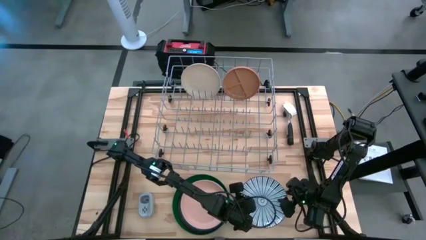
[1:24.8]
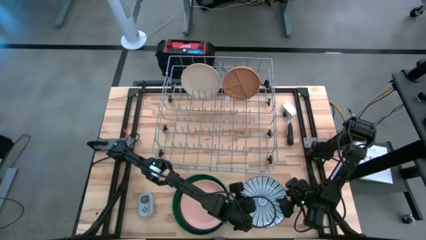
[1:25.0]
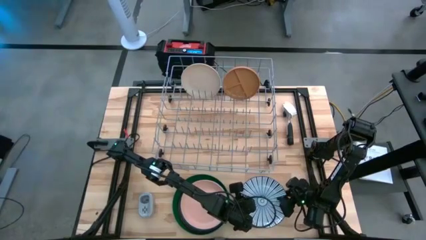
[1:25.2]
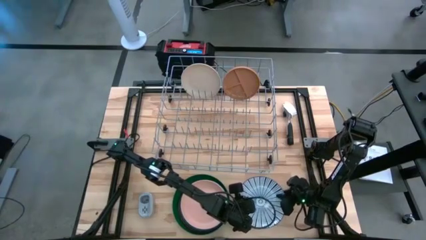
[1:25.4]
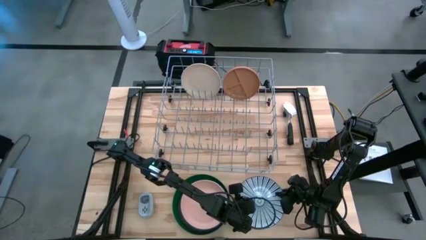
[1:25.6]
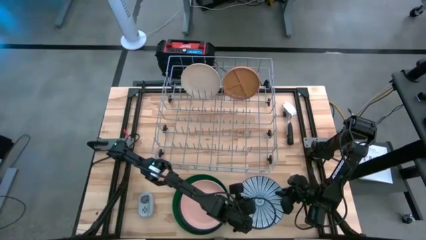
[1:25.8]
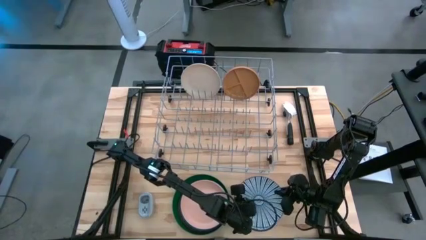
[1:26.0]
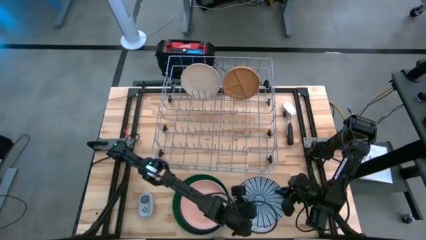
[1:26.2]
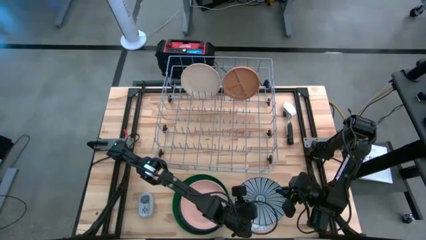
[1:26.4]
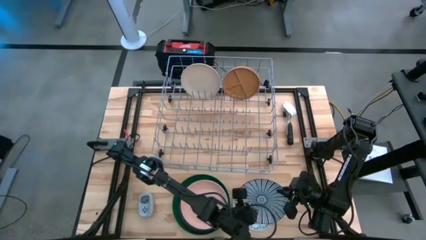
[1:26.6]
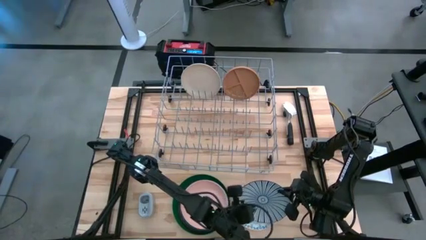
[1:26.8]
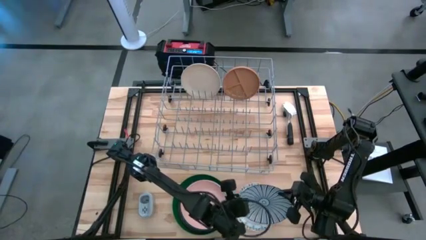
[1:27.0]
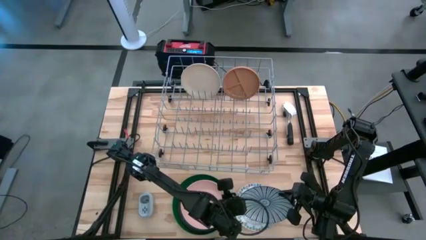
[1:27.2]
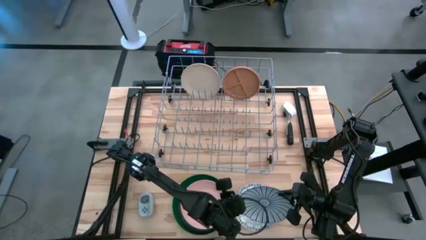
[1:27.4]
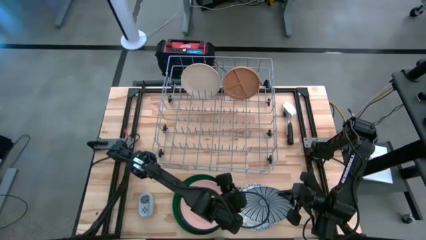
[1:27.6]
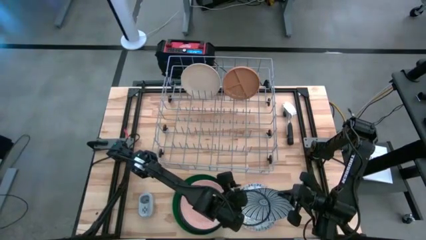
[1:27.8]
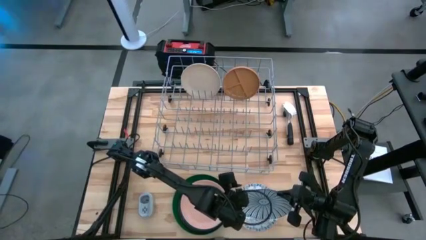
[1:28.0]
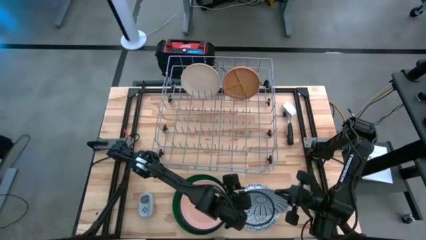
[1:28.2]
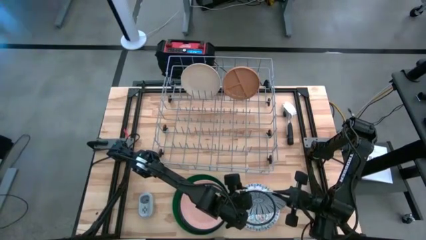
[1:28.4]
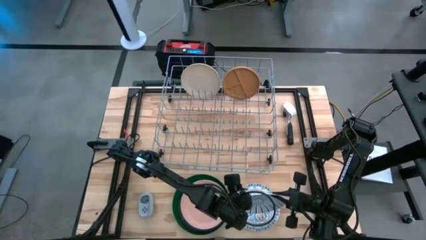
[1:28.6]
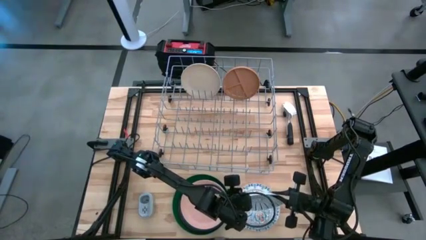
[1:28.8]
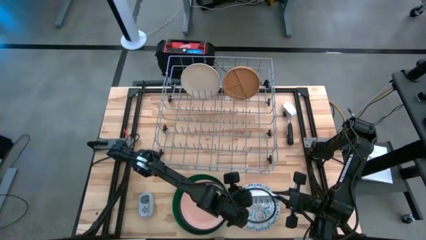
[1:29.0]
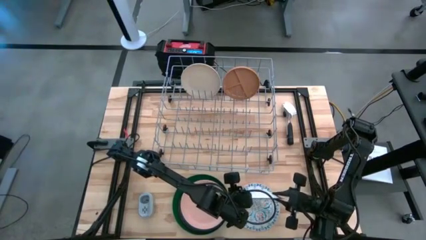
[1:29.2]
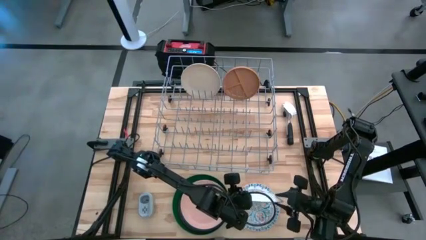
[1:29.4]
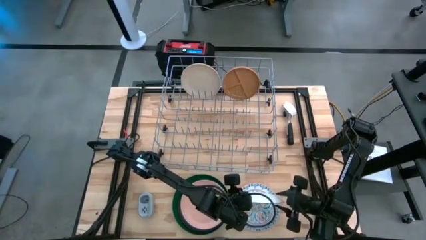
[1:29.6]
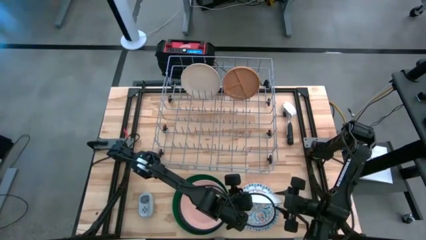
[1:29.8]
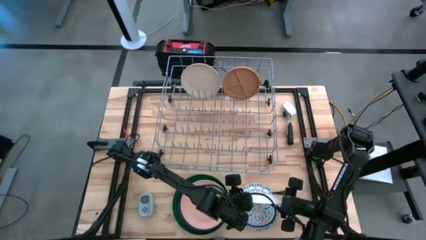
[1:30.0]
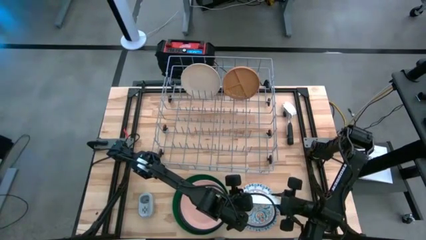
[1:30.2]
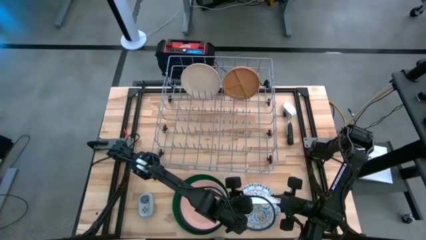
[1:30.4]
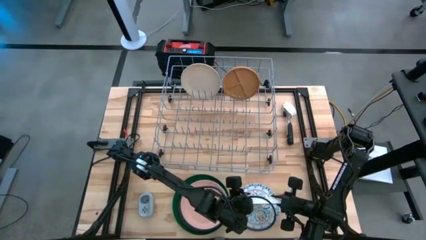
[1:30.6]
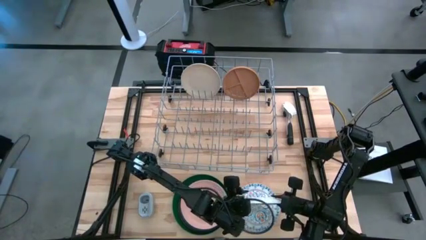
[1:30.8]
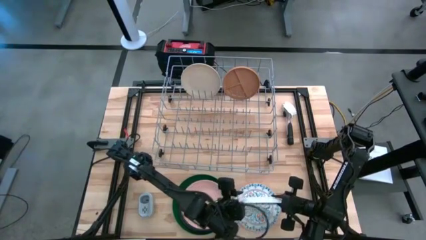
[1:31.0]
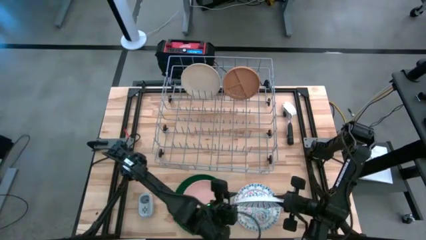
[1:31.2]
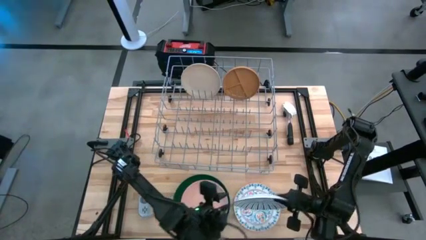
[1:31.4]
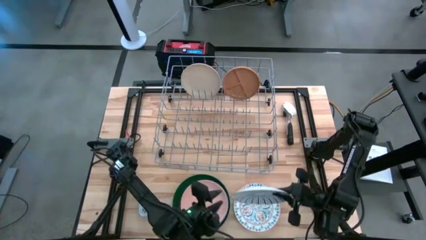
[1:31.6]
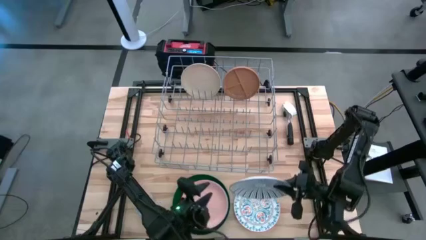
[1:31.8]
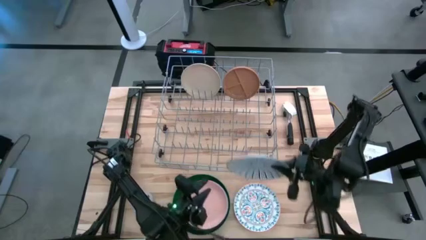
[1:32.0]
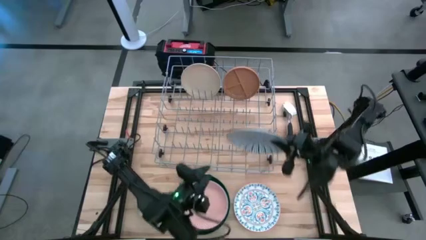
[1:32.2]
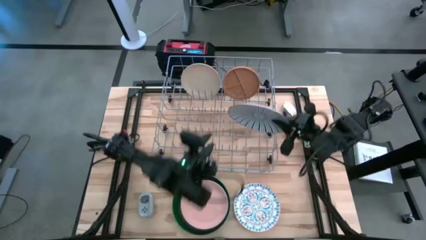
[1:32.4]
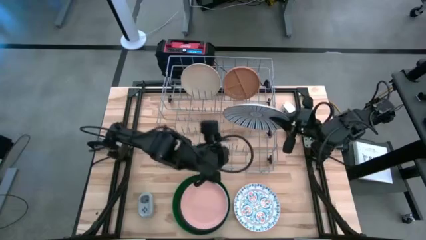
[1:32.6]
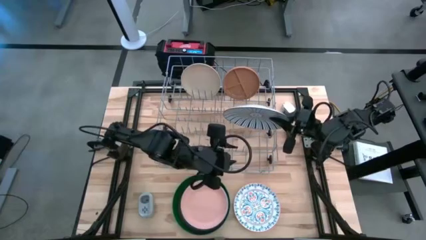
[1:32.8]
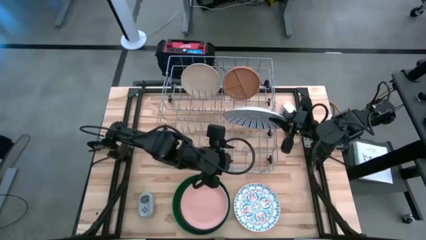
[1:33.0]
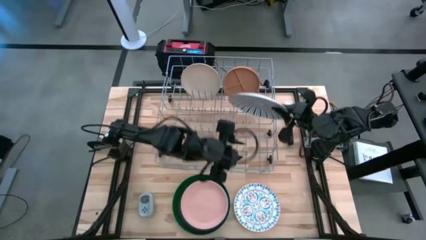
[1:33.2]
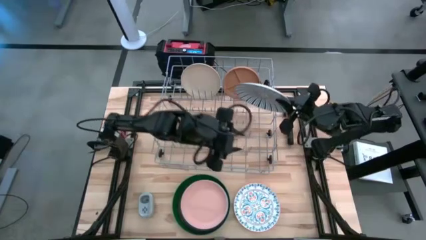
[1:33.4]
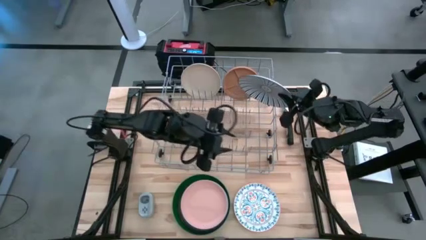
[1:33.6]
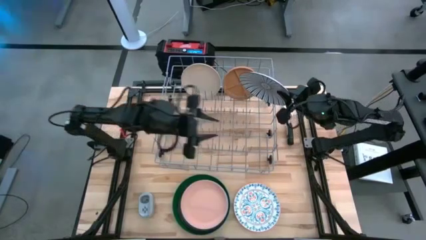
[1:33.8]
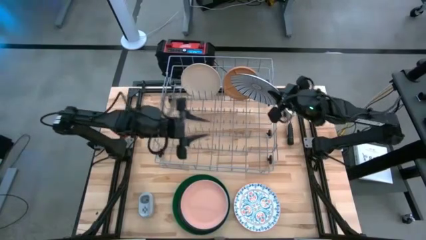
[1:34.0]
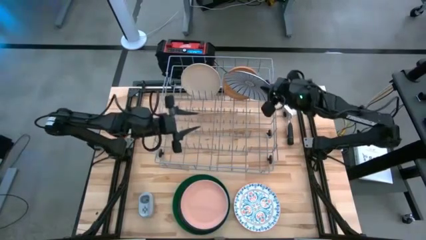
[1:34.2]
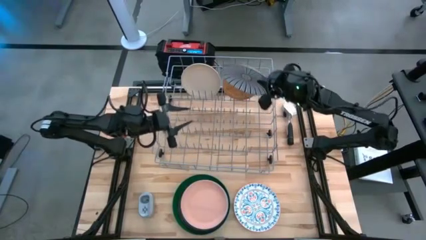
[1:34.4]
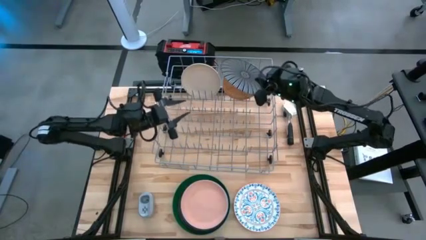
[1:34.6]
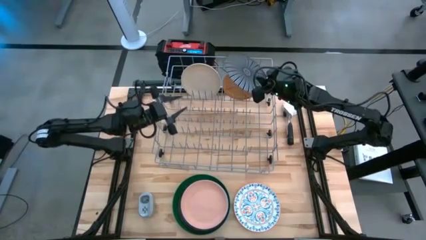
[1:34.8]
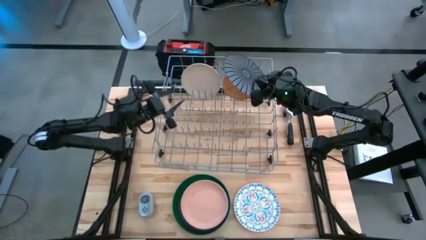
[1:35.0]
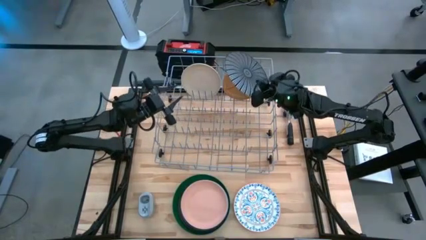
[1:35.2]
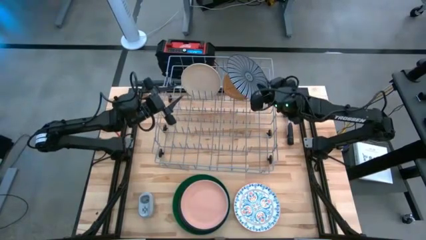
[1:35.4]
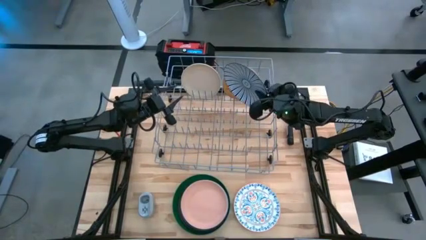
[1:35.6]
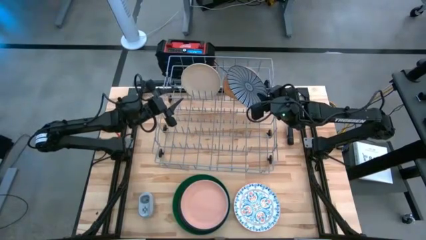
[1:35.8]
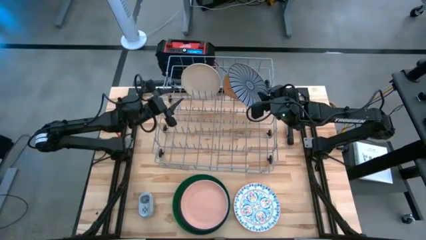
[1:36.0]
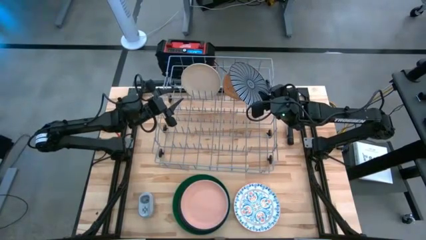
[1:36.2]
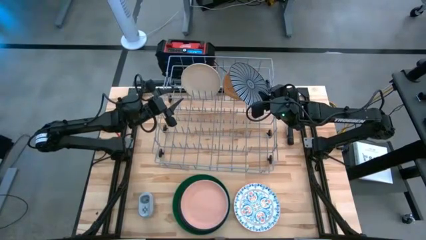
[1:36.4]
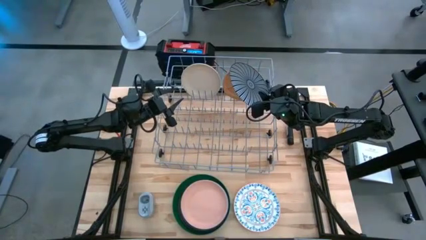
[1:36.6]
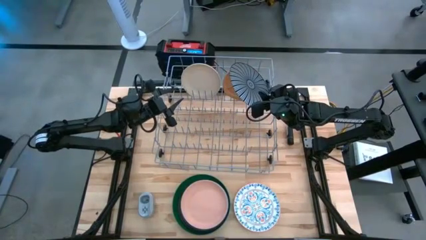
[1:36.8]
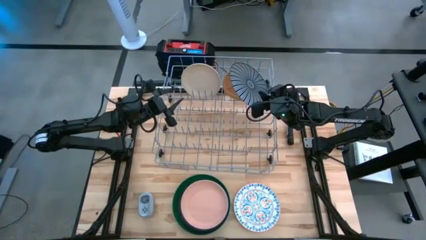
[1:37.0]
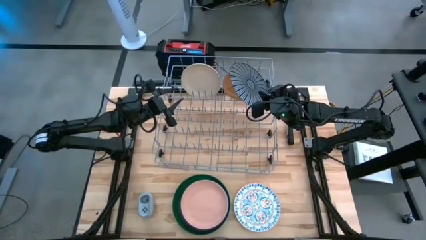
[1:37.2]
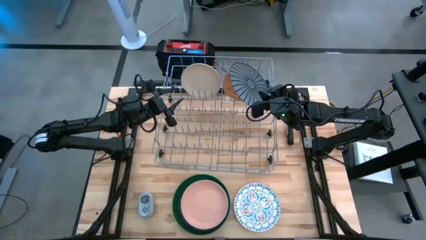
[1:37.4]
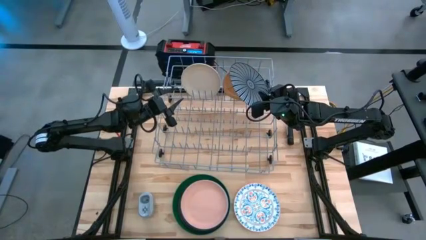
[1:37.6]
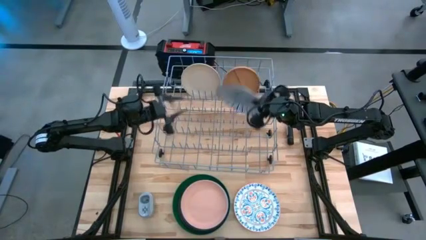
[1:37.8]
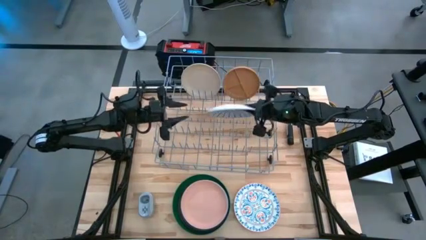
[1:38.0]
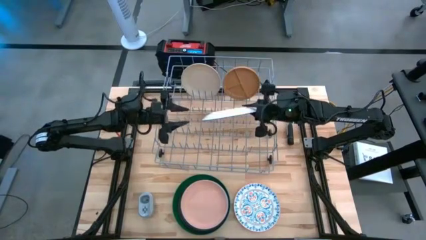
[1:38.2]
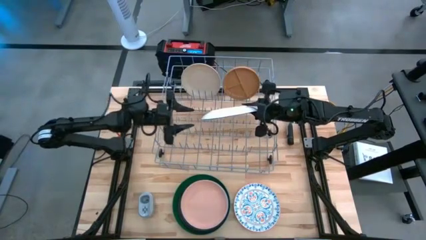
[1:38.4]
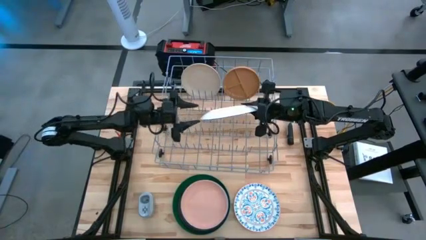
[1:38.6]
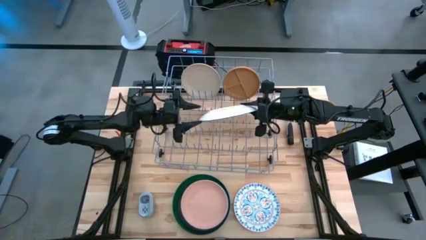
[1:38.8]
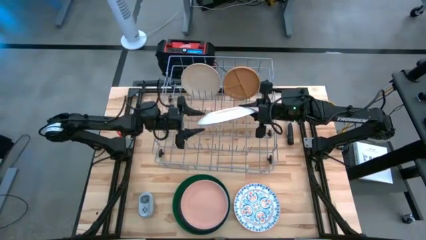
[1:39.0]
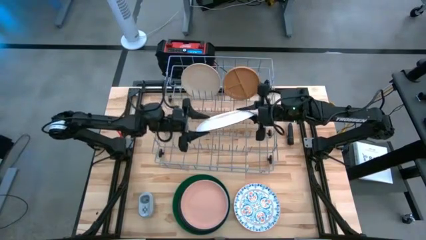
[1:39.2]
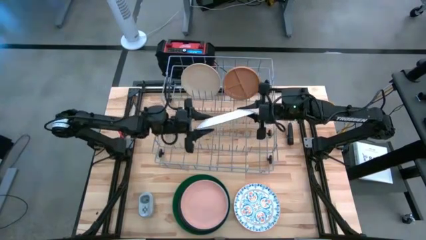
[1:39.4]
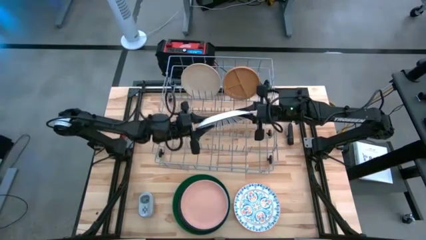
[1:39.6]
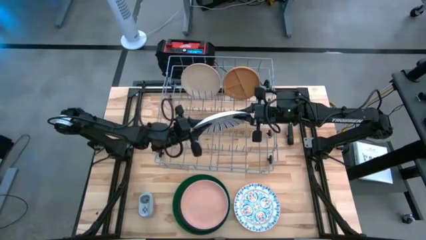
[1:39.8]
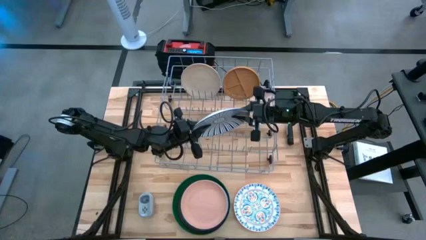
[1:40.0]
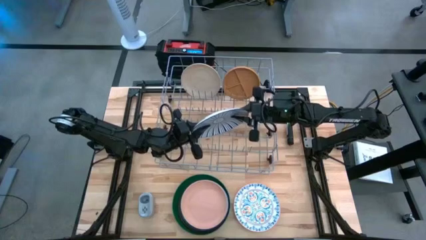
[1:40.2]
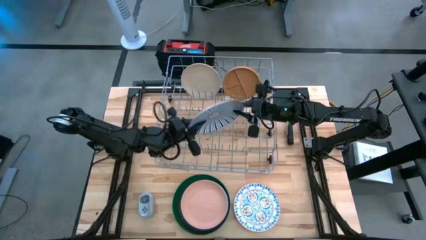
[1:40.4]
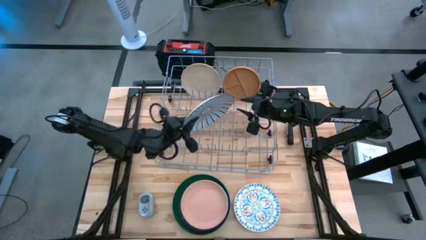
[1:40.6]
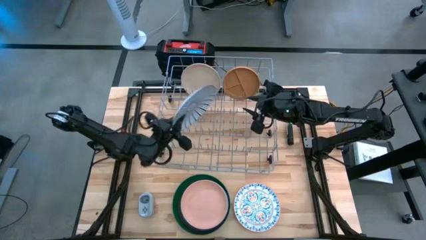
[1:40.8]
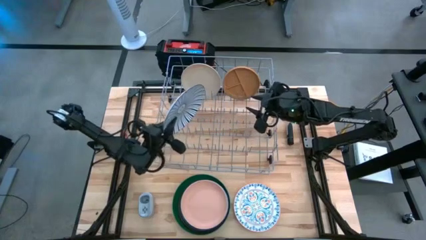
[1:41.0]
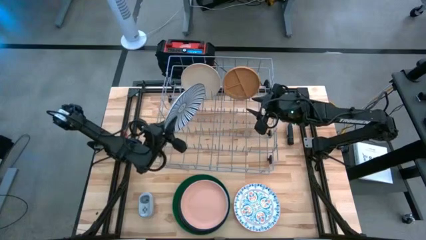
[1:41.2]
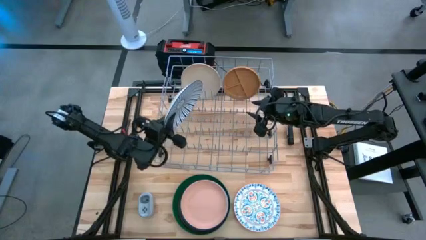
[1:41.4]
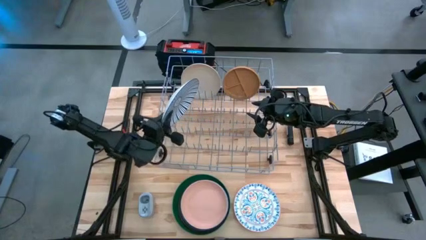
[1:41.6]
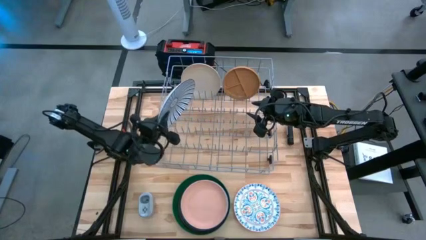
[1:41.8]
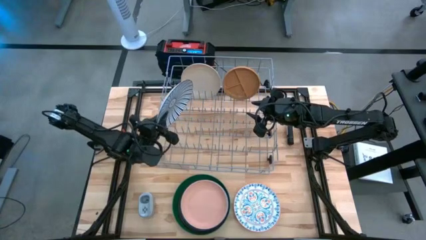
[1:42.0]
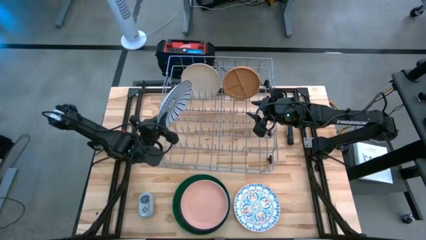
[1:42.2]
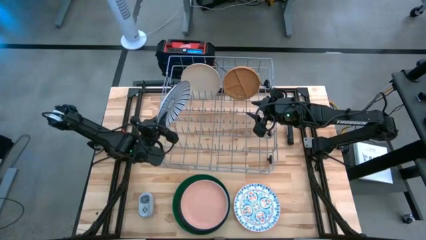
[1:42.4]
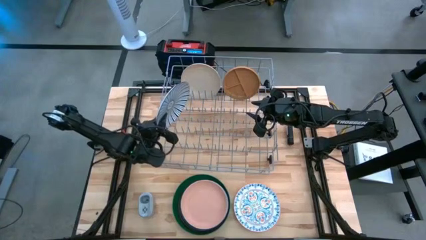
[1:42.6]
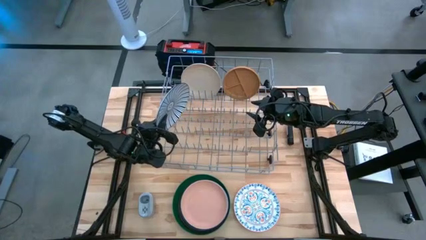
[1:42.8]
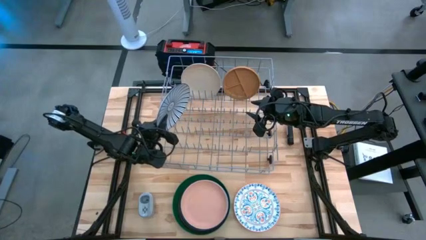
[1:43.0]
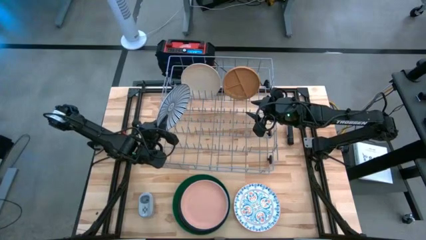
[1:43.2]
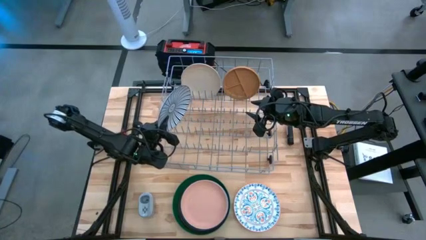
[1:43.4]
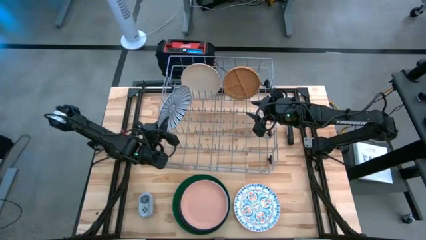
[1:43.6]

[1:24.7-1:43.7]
Task: Sort dishes
Put the blue patterned plate into the dish rack
